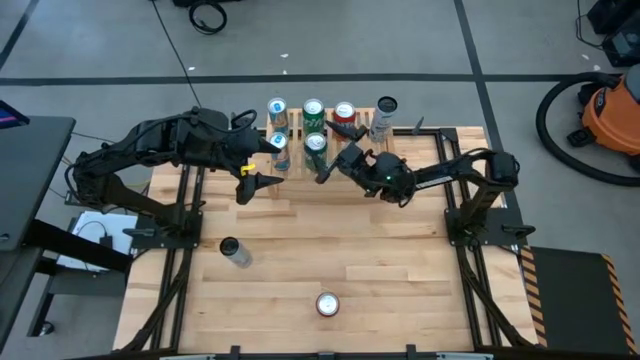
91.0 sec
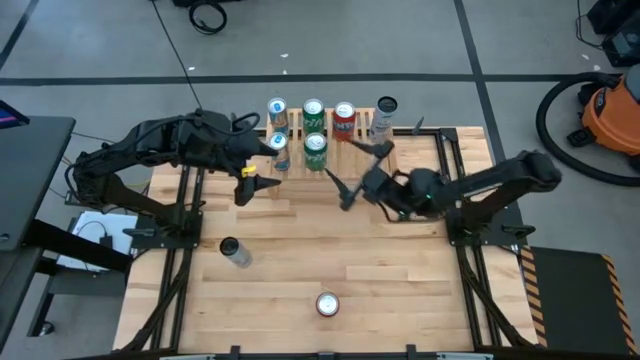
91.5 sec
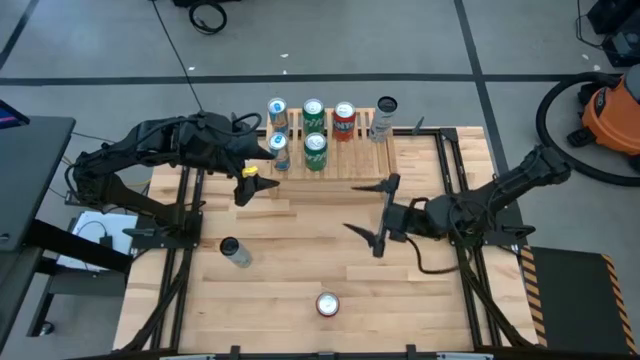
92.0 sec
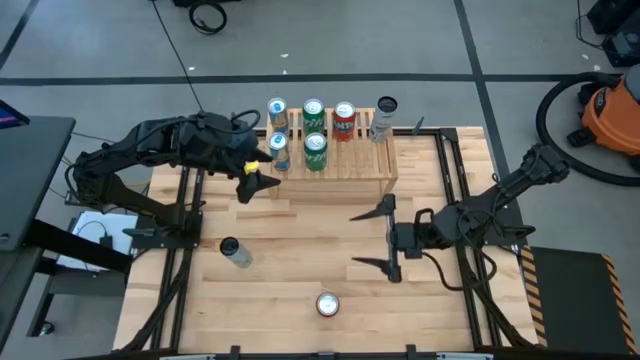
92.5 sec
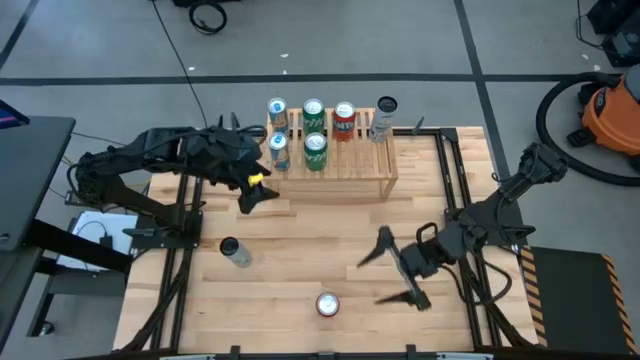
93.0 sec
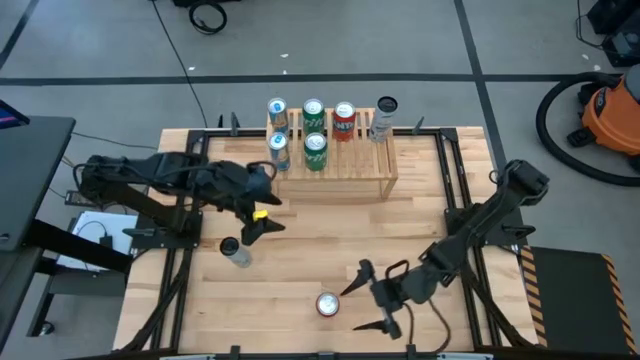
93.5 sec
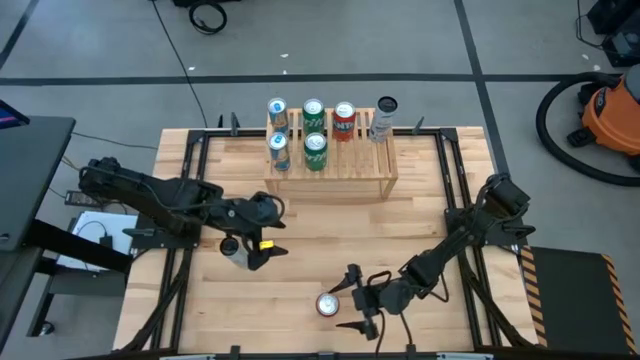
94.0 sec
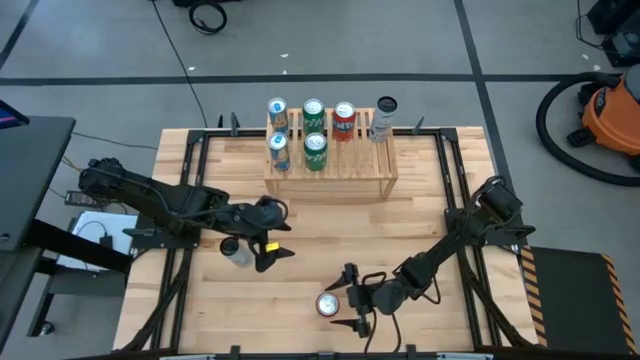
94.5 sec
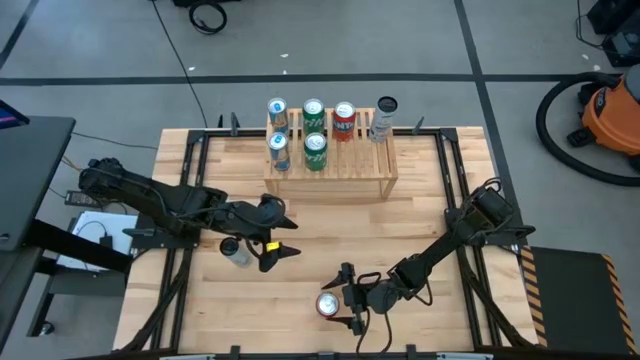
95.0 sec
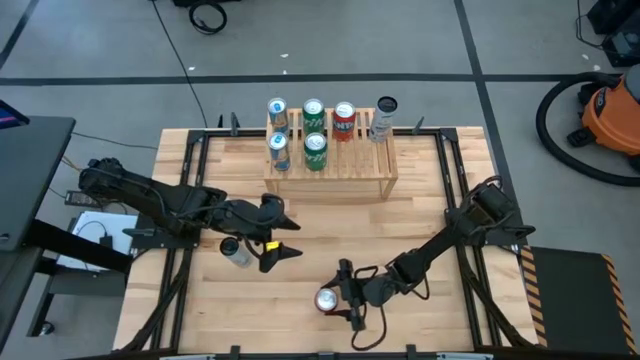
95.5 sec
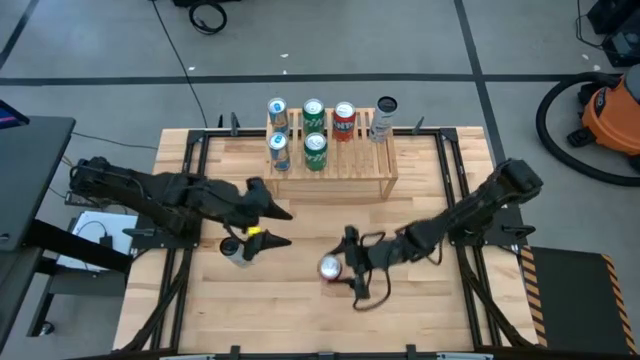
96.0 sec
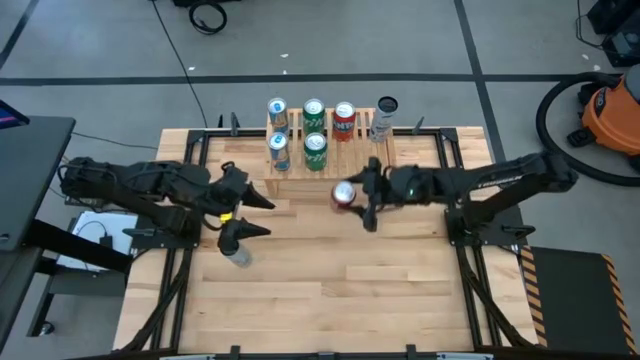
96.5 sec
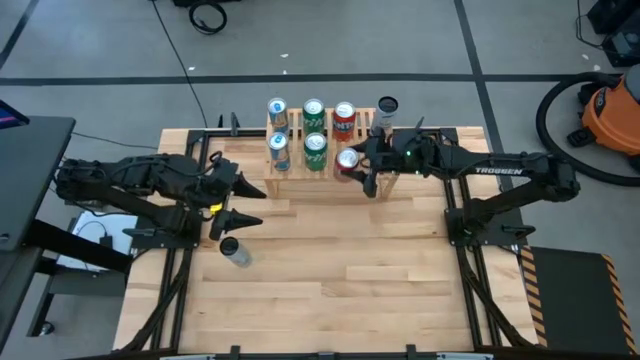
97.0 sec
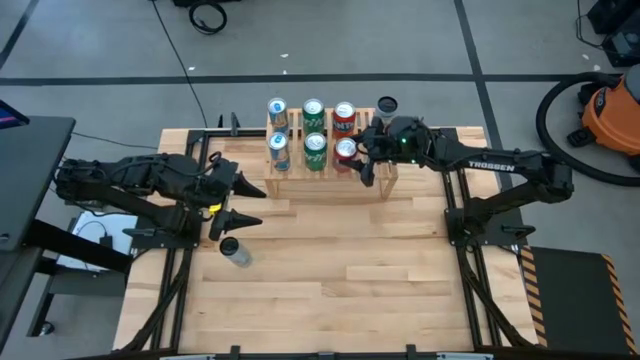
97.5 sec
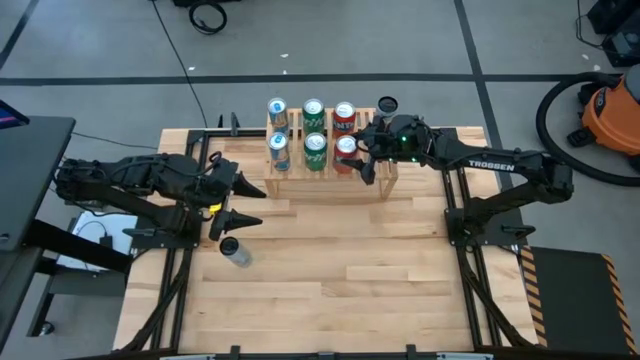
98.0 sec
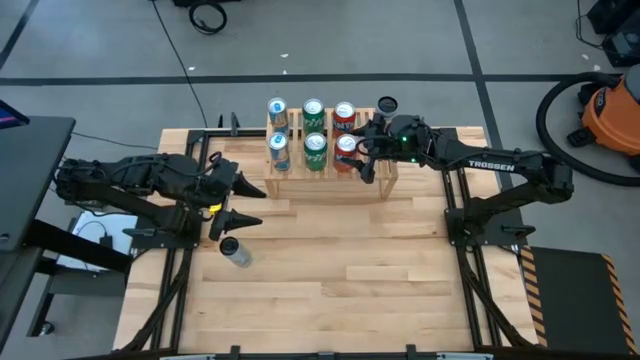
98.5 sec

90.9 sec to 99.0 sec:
Task: Place canned beverage on shelf
Align the orange soda can with the other orange soda can on the shelf

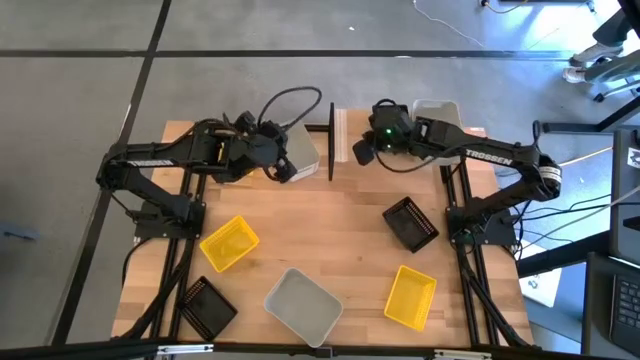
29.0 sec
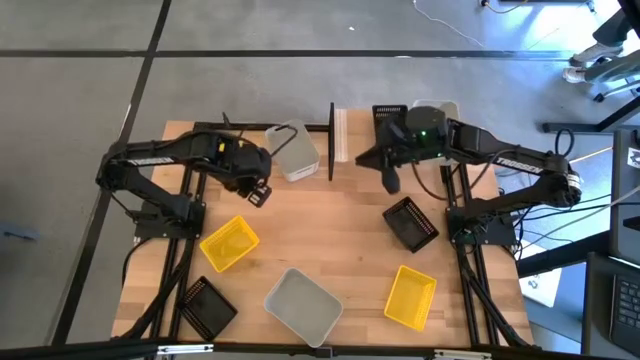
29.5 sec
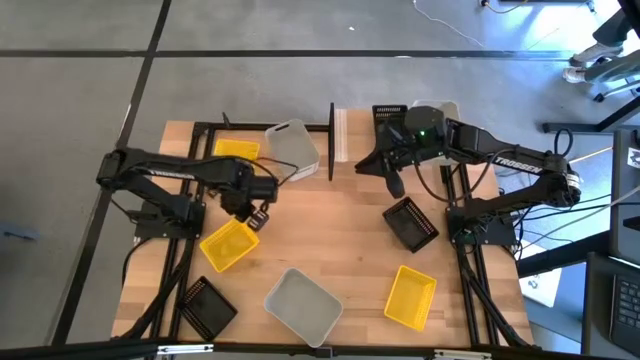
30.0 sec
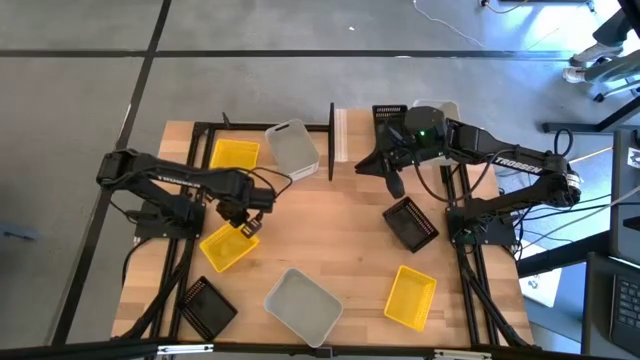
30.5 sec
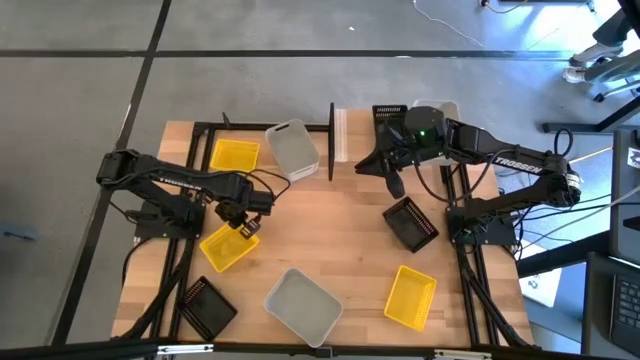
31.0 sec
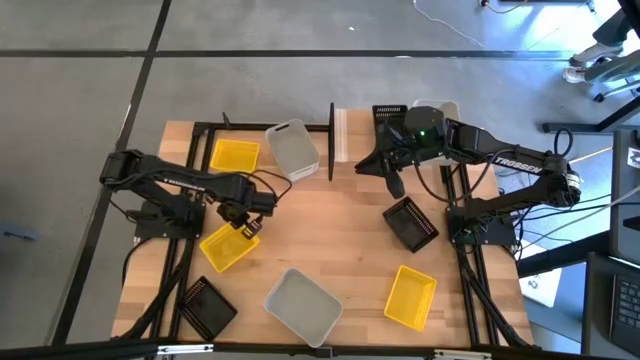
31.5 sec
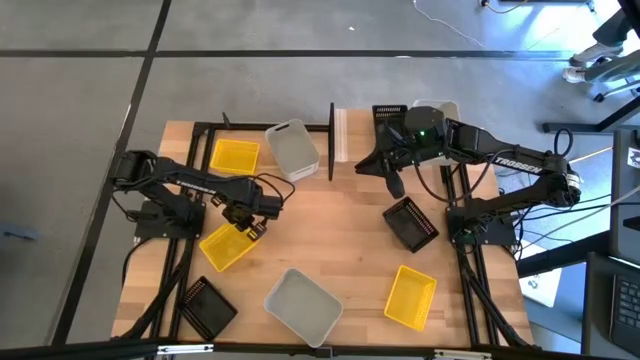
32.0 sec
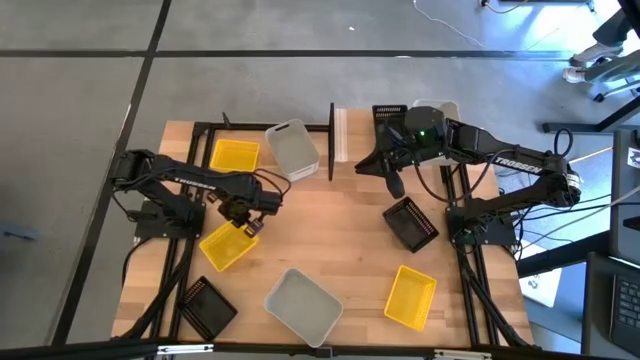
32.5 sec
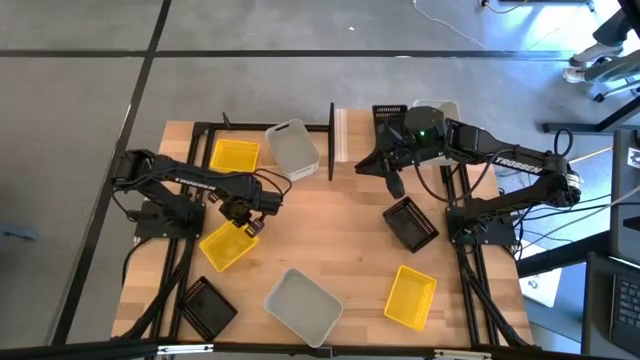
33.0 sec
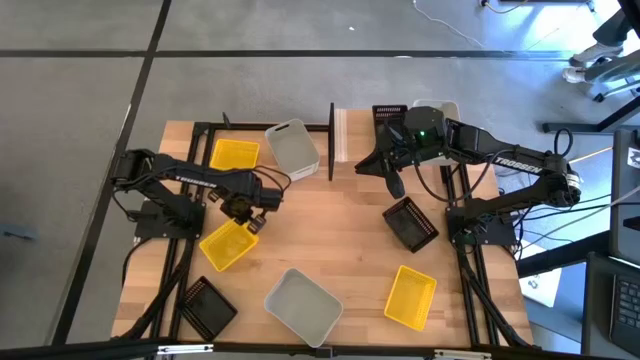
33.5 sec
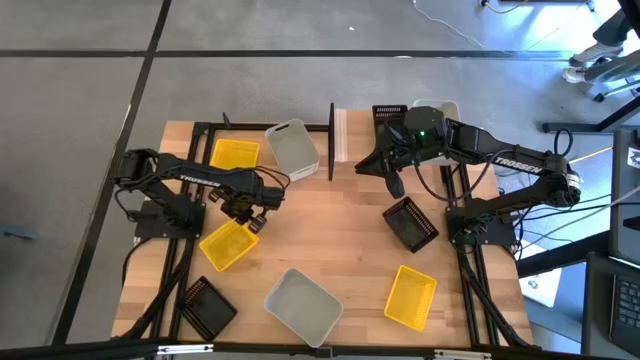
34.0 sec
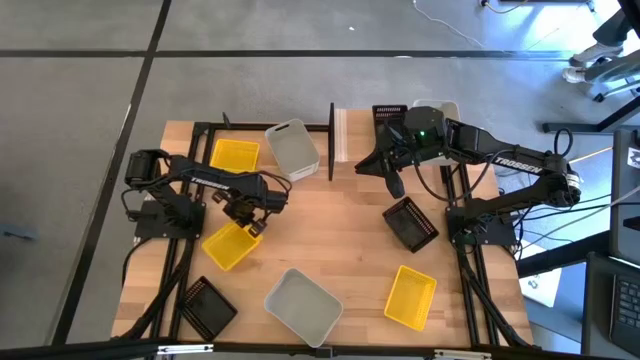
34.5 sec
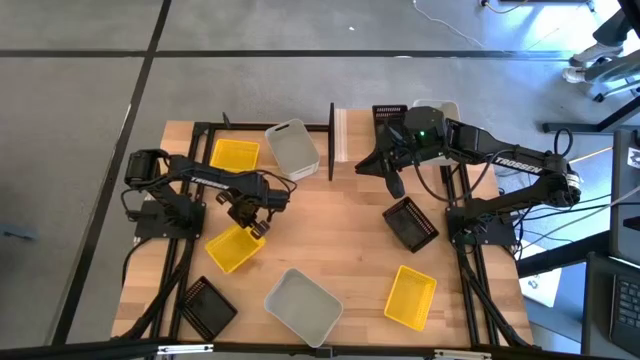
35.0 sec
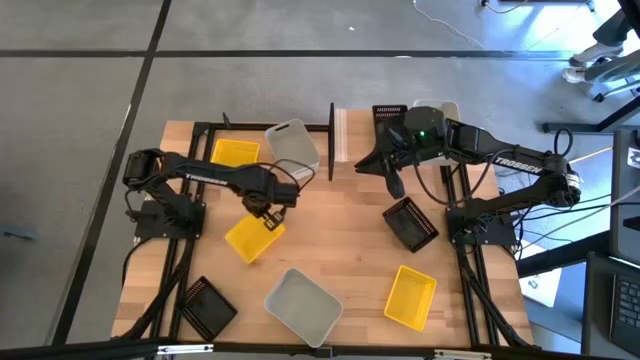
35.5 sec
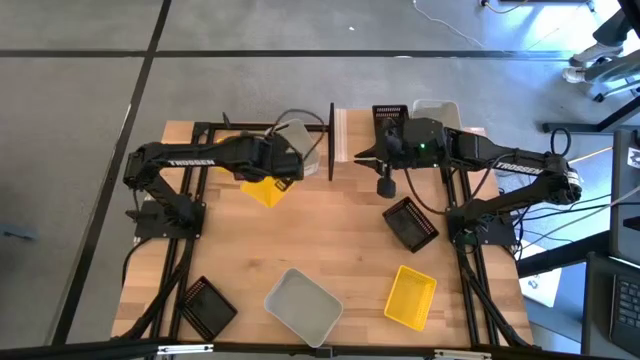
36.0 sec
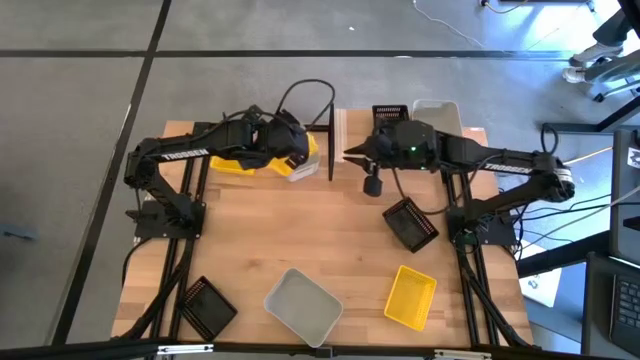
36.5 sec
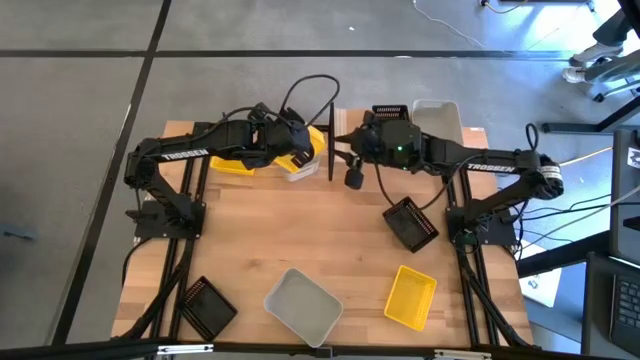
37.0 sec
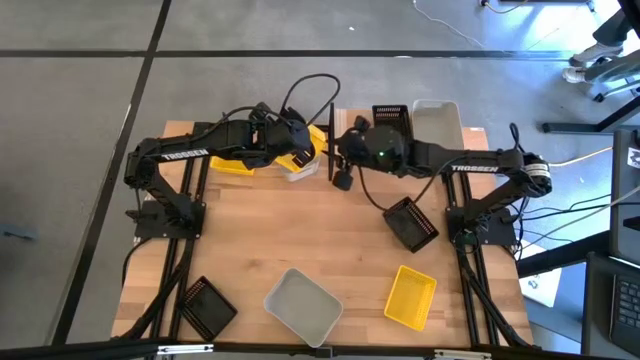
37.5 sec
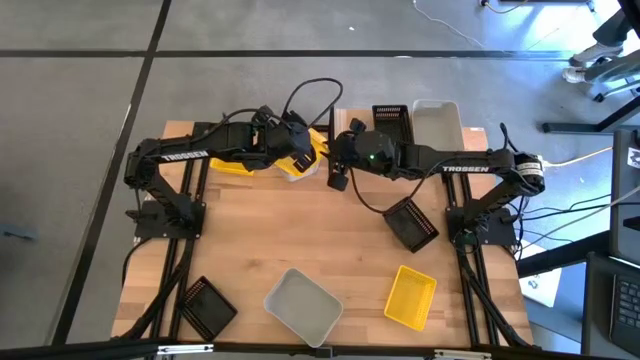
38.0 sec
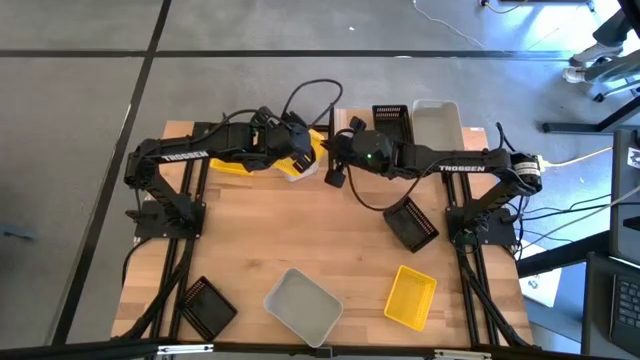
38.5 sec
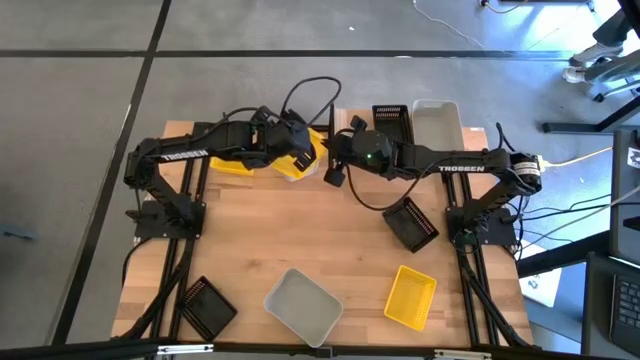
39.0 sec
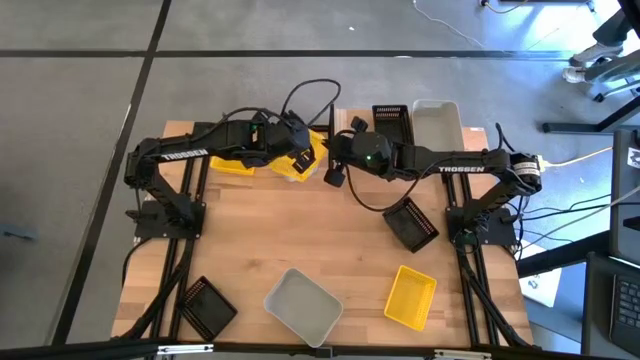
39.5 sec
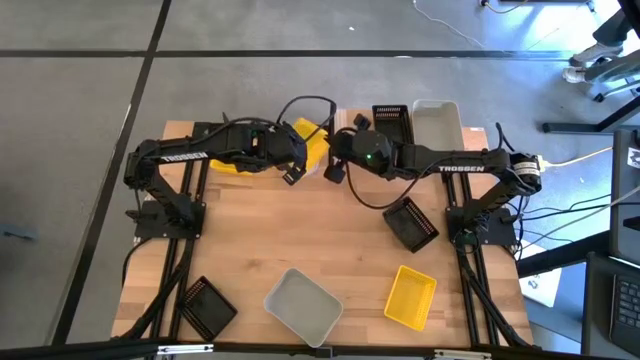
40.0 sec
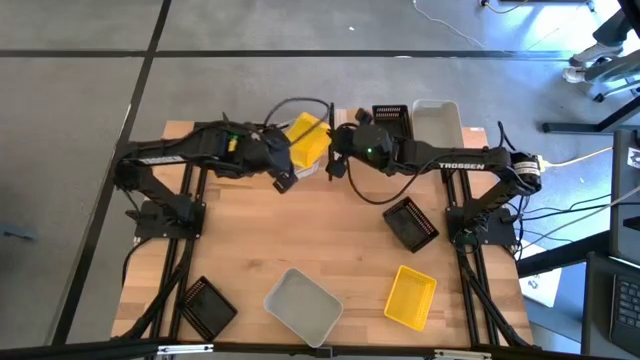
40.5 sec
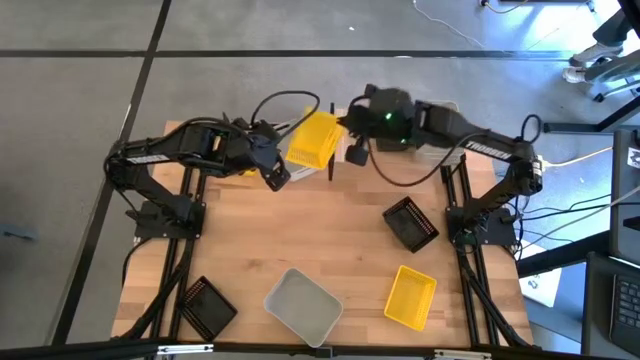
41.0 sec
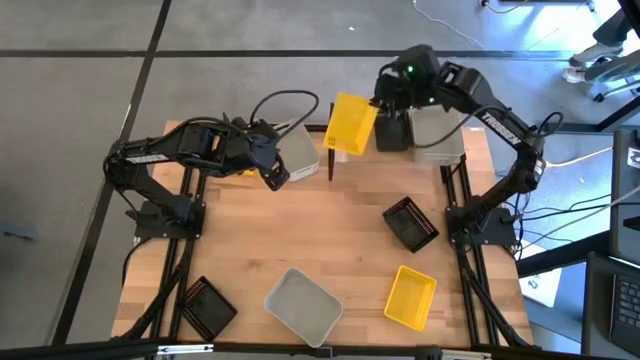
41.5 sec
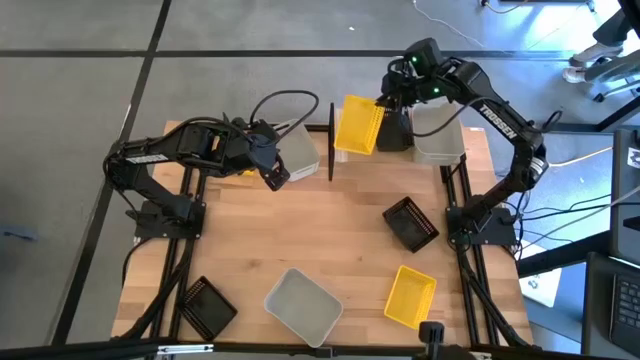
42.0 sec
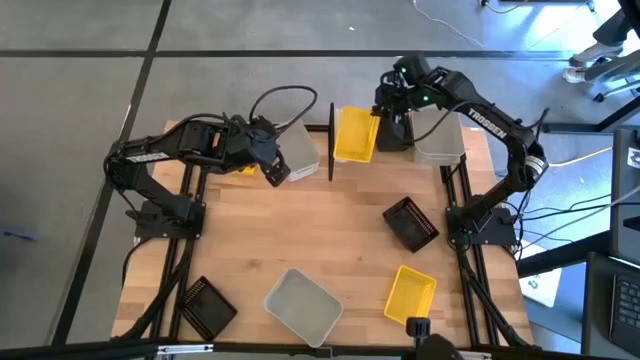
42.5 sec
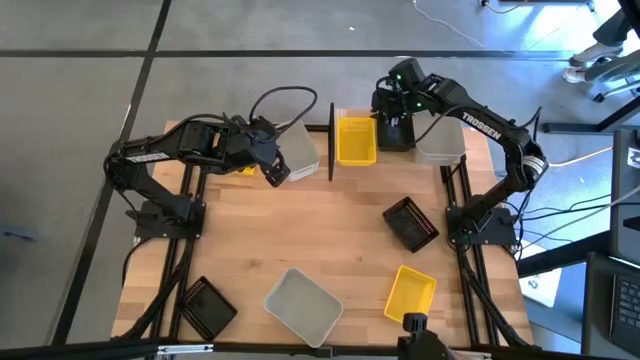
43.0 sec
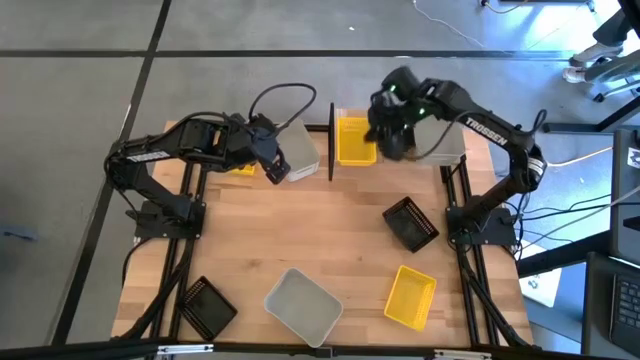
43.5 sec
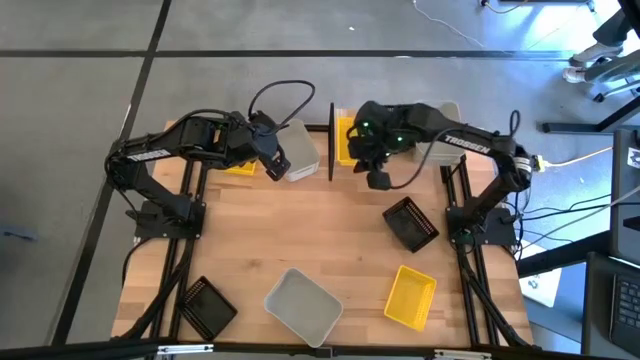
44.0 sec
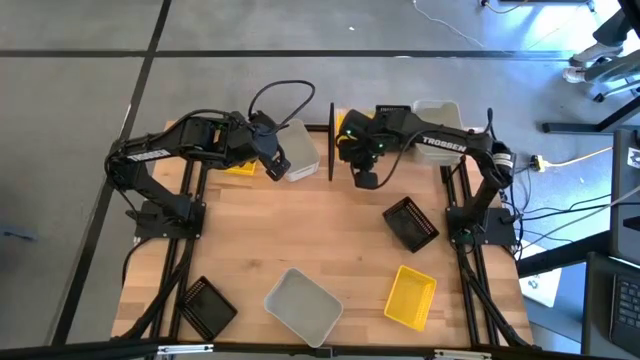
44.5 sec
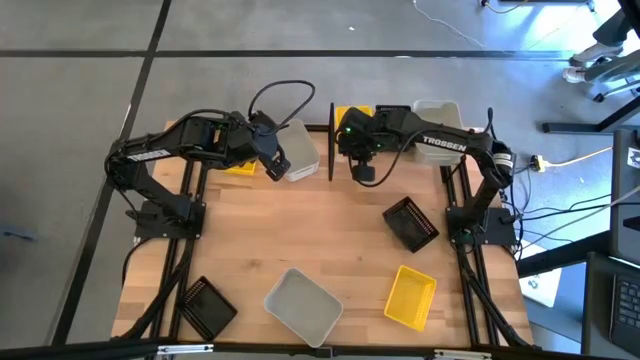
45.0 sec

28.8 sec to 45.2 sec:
Task: Stack baskets on shelf by color
Put the middle right yellow bin on the shelf
